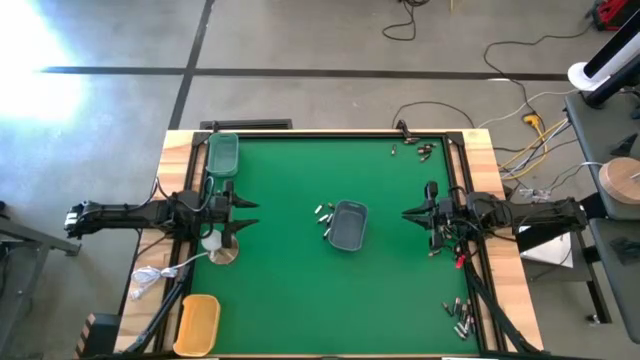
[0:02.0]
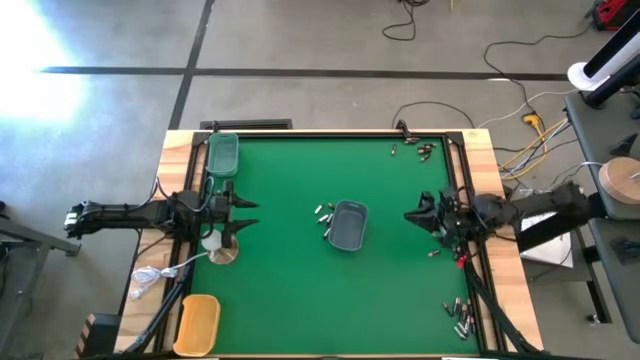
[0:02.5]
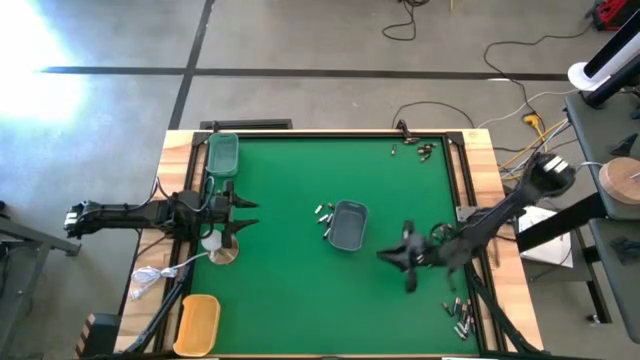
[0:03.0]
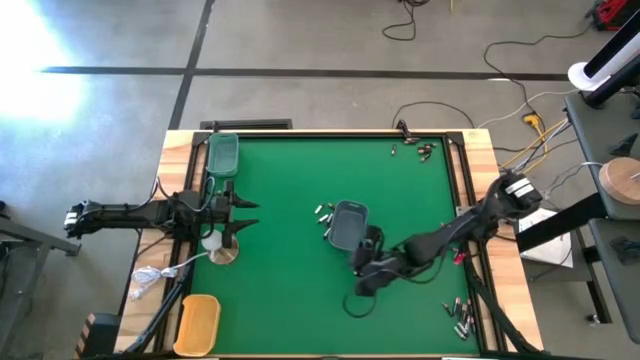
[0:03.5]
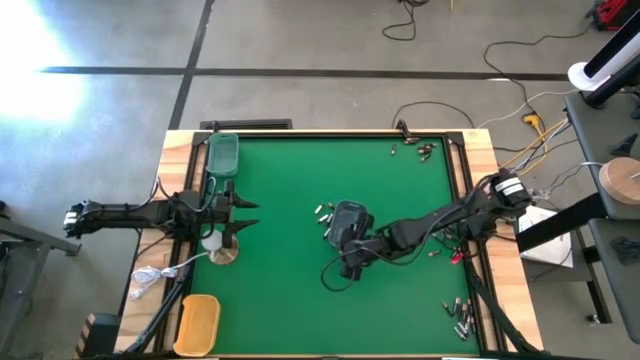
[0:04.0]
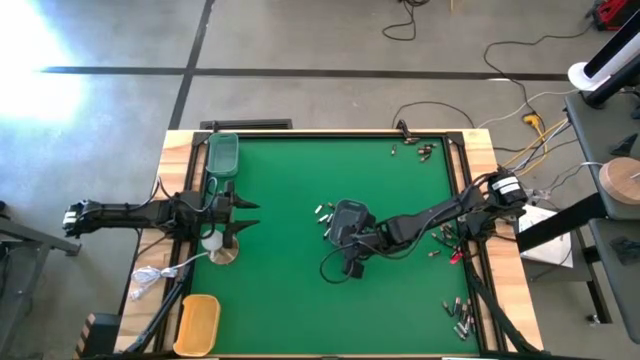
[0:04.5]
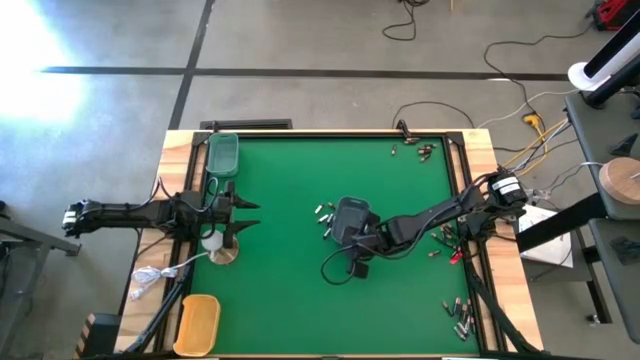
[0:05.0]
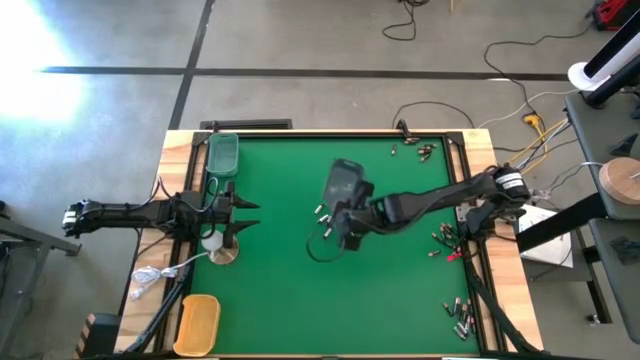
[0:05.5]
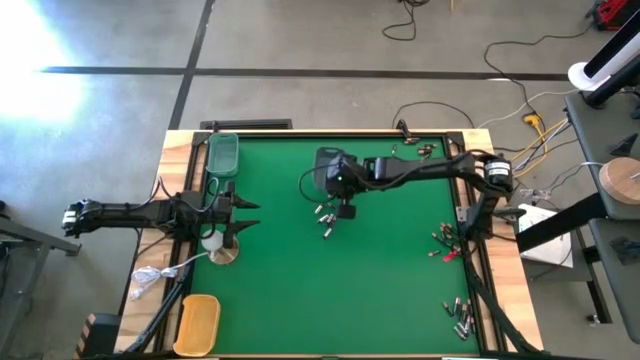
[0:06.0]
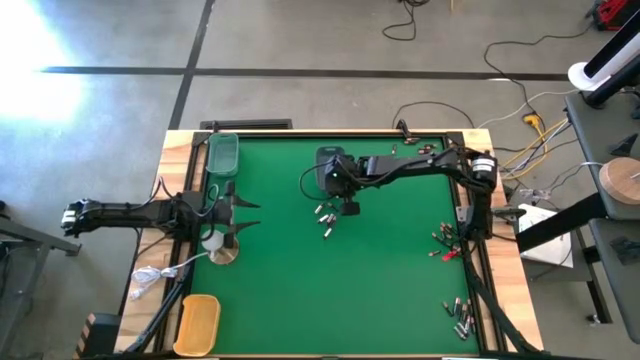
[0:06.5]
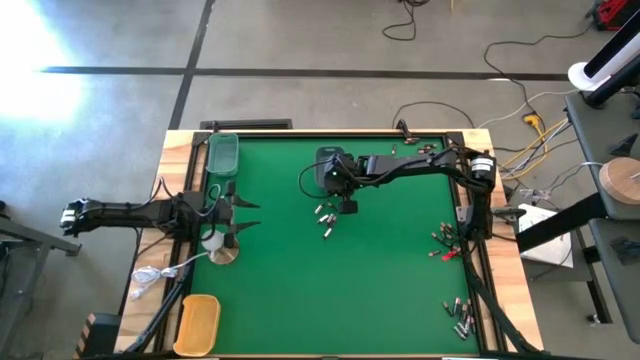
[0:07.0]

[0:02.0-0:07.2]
Task: Sort batteries
Move the gray bin to the right top middle of the table

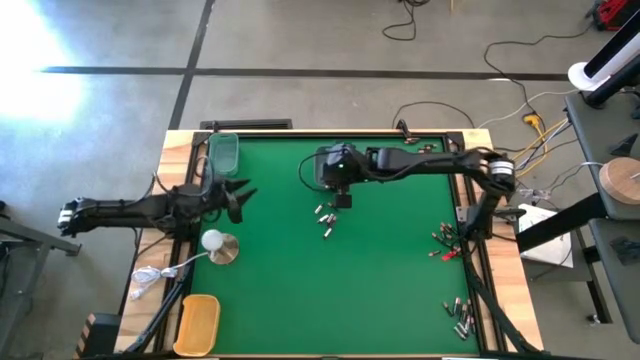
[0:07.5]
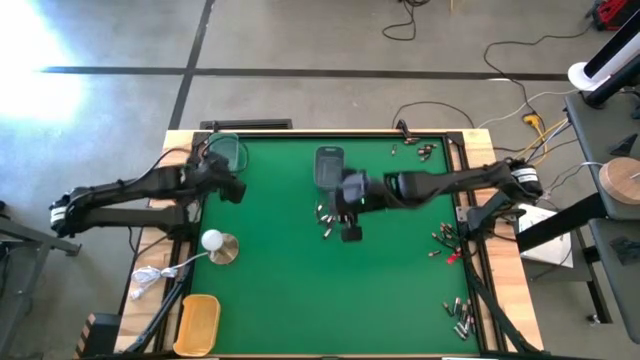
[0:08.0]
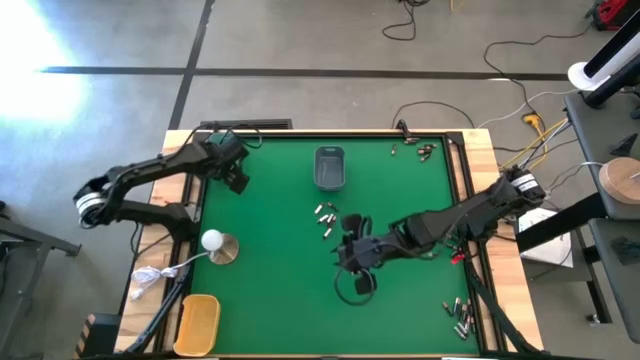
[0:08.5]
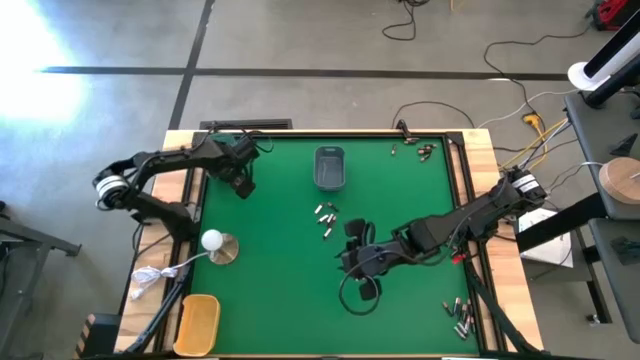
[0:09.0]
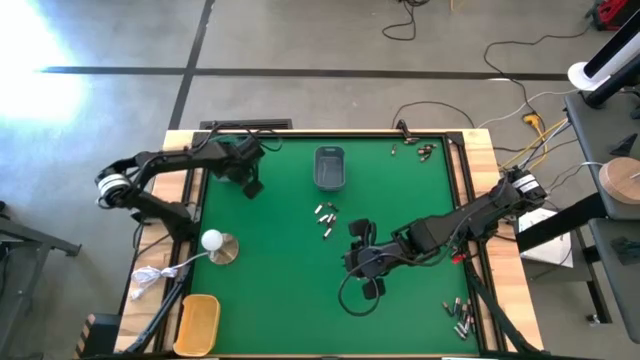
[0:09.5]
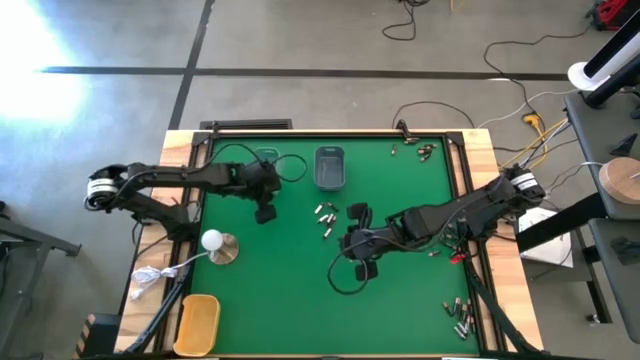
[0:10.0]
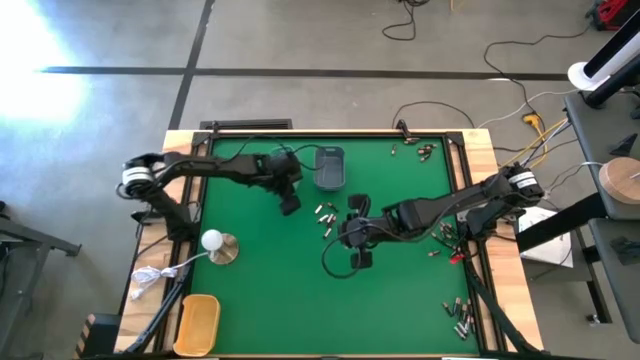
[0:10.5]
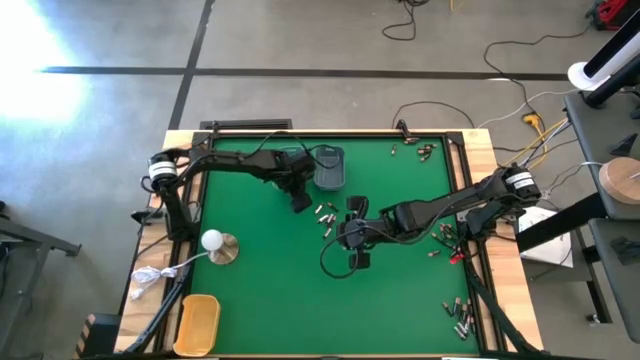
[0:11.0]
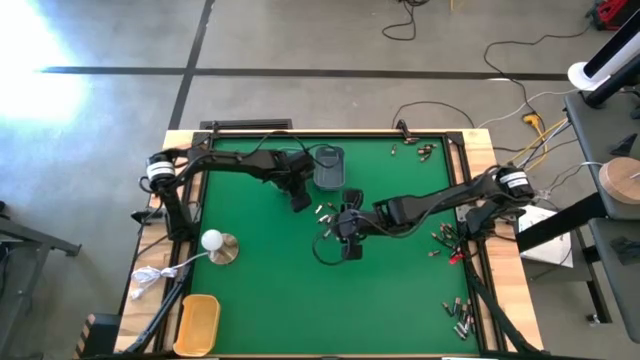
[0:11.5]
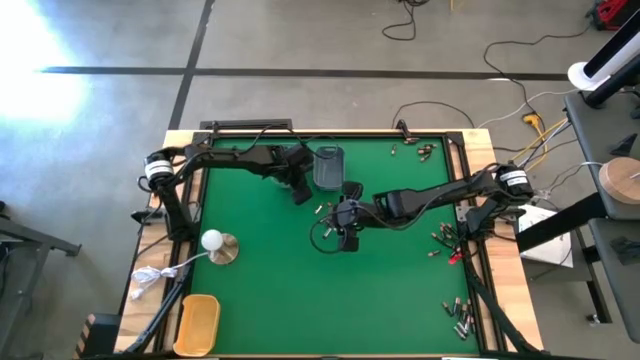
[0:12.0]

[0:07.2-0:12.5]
Move the green bin o the top middle of the table

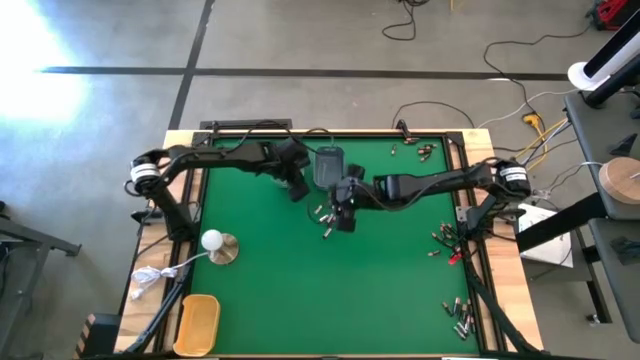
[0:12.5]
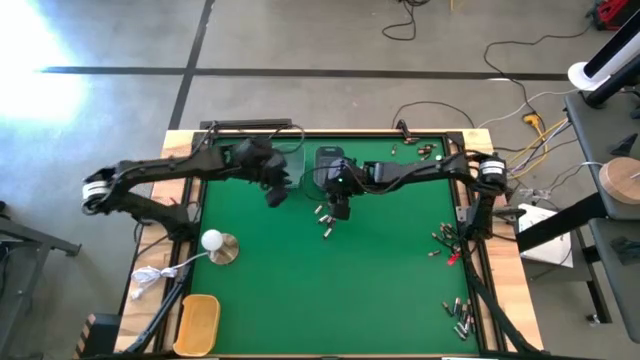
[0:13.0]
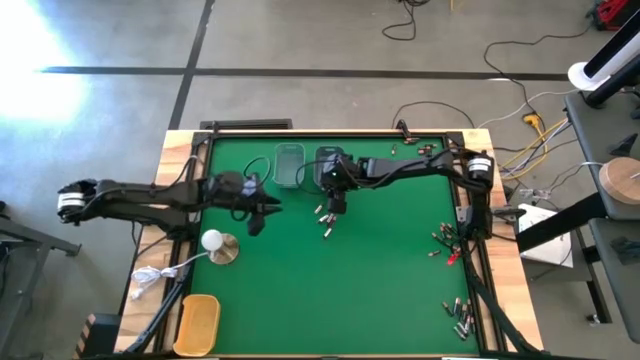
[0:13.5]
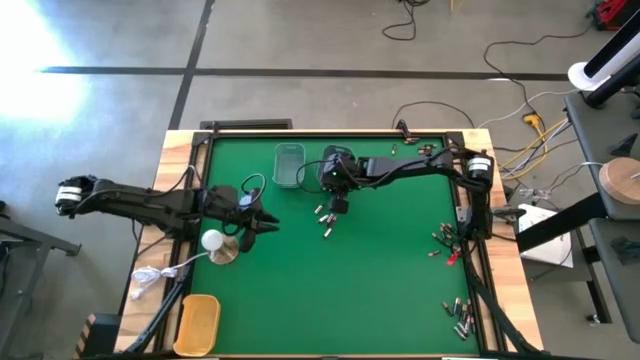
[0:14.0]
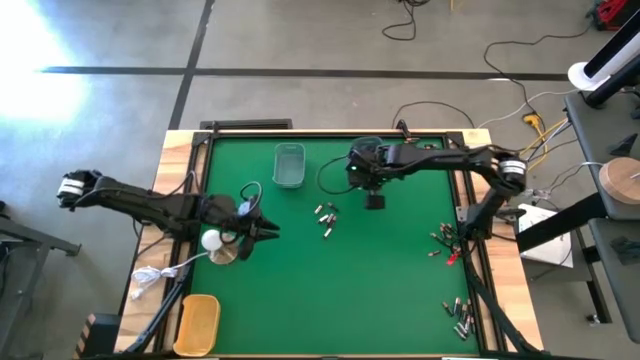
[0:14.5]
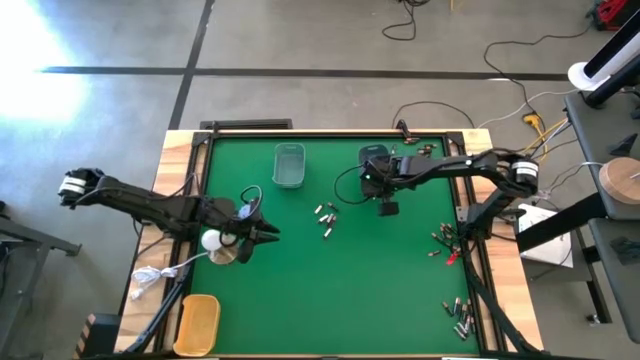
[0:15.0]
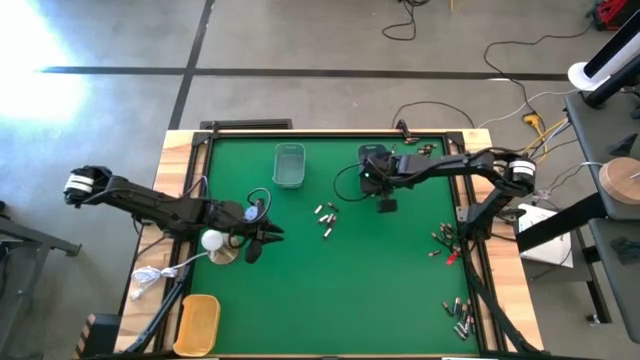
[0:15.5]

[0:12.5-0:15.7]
Move the gray bin to the right of the table

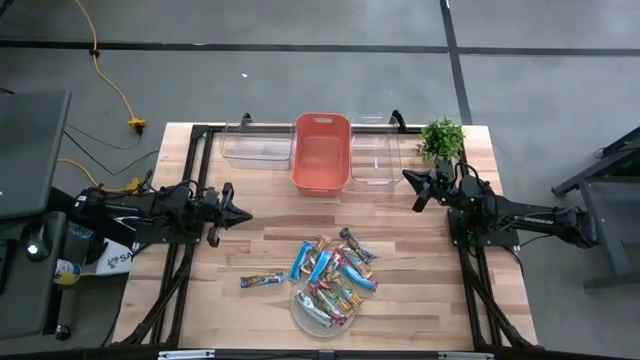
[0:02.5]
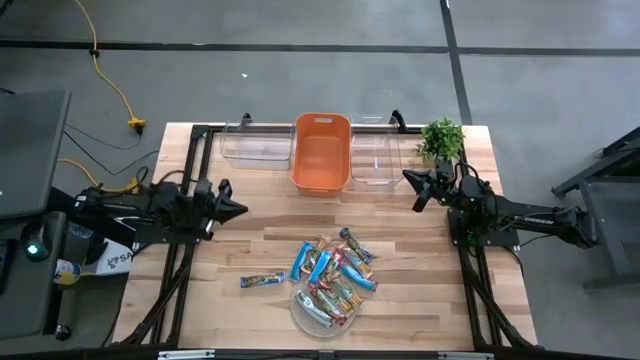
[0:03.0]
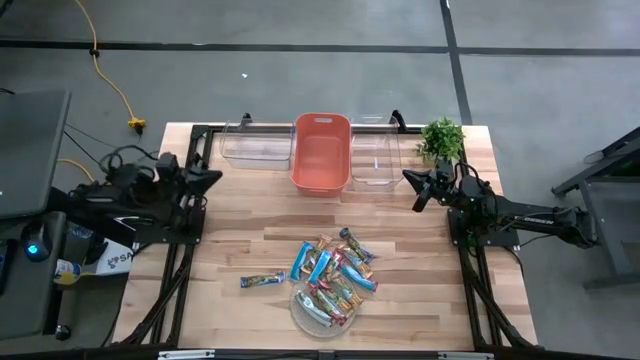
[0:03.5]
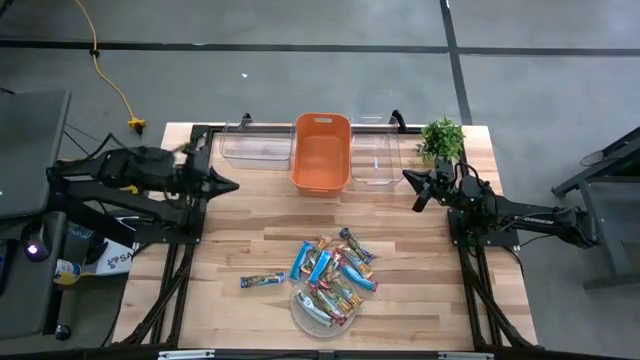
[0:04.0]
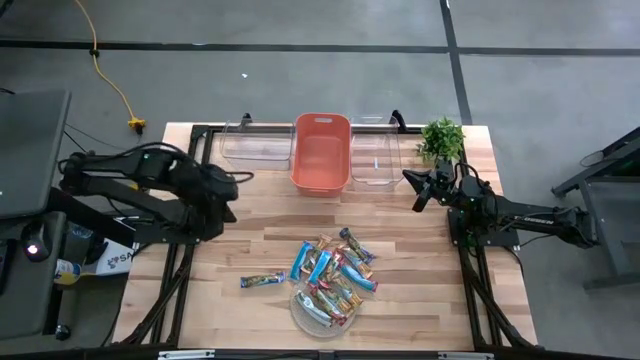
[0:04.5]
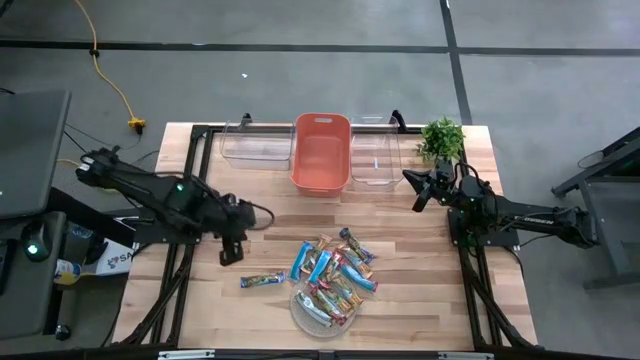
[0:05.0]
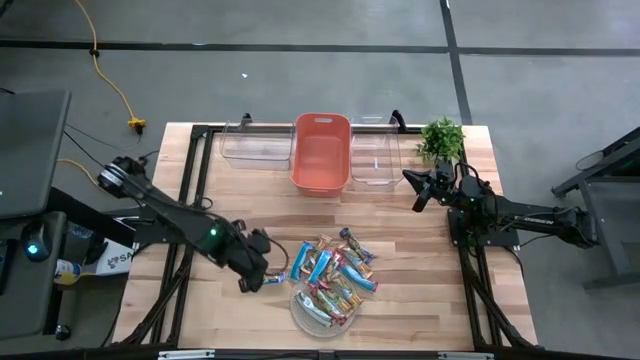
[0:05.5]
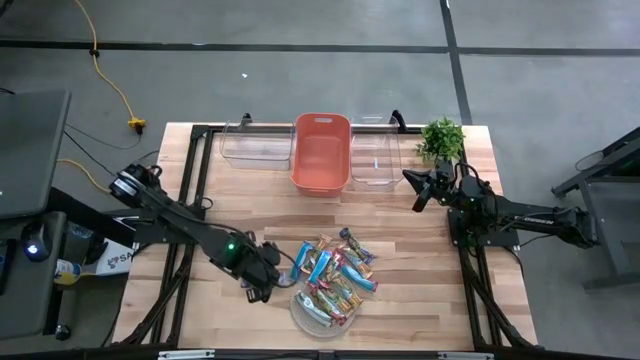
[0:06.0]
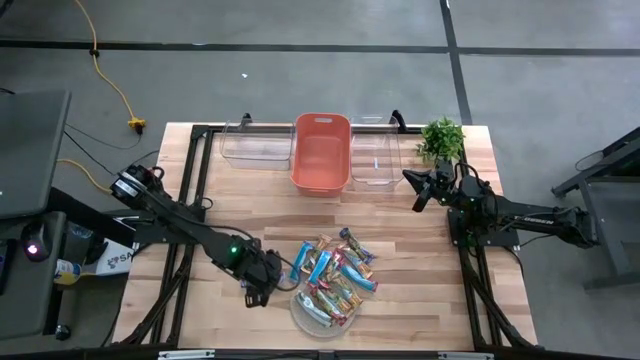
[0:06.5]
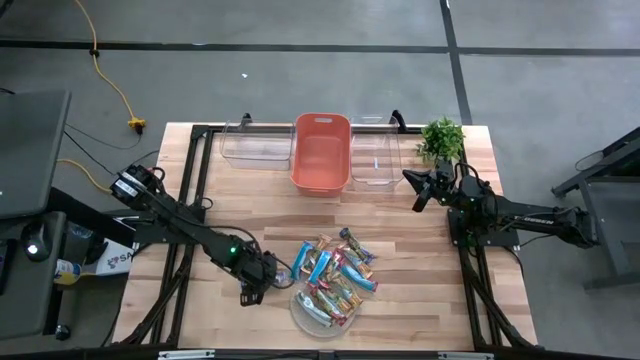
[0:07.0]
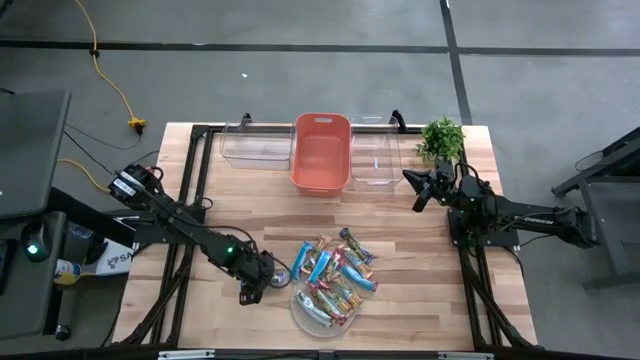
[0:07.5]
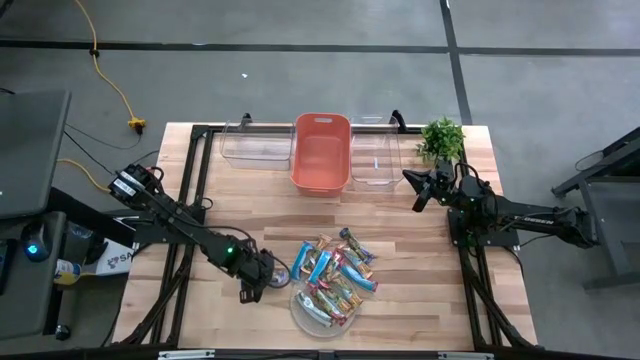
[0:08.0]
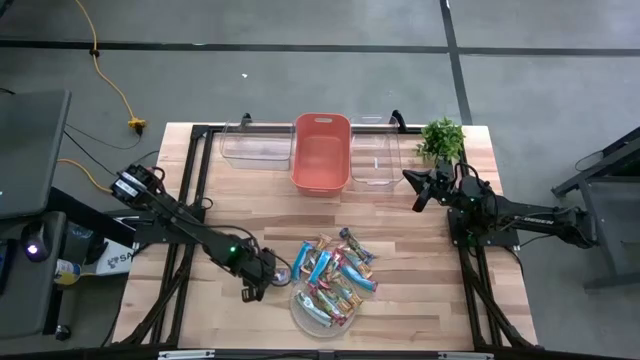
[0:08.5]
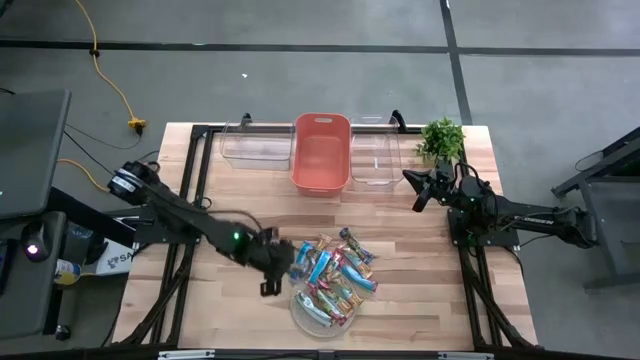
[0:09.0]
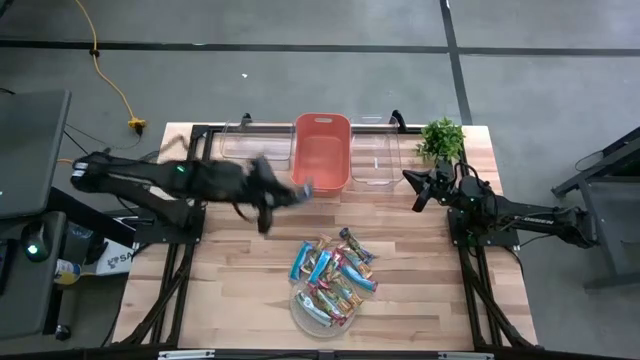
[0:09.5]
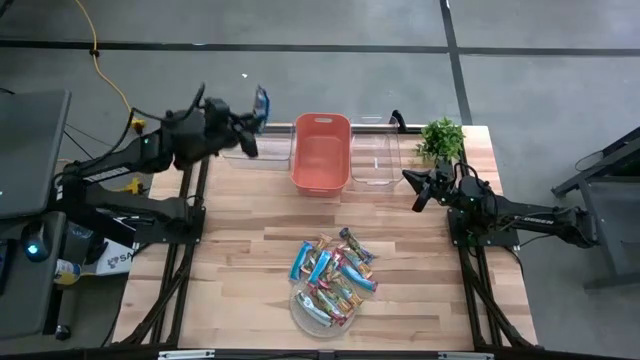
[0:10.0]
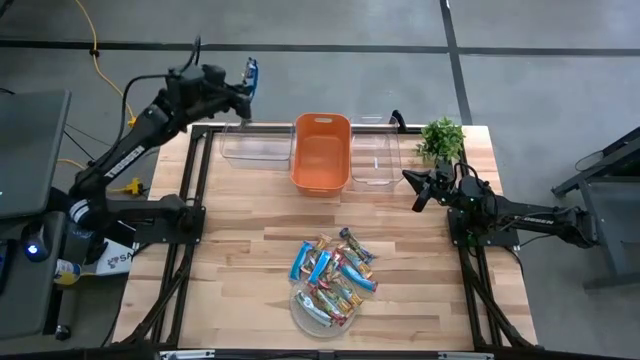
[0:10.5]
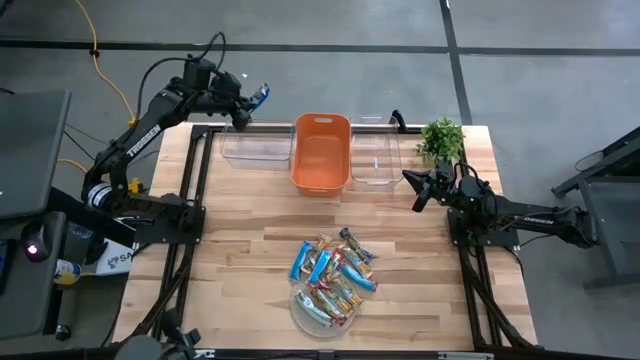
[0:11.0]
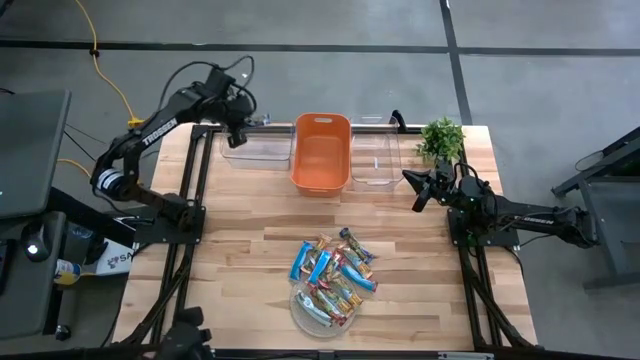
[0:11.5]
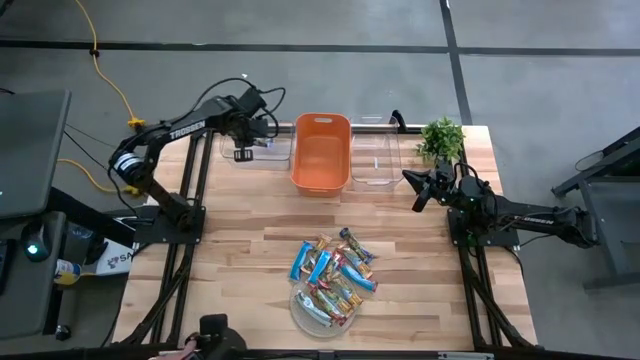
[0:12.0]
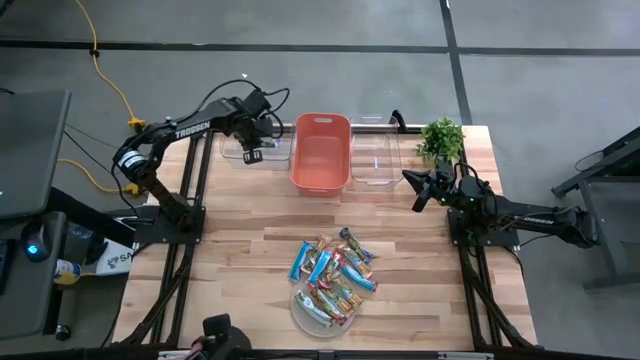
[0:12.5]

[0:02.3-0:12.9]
Task: Pick and place Granola Bars by type
Put the blue granola bar into the left transparent bin
